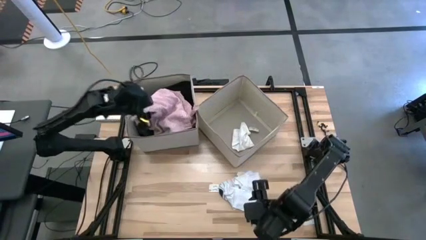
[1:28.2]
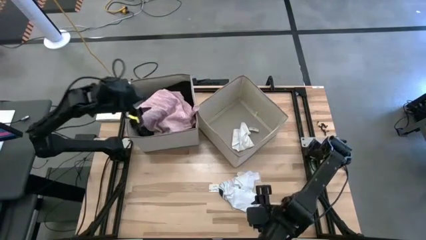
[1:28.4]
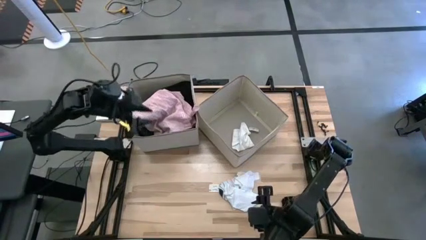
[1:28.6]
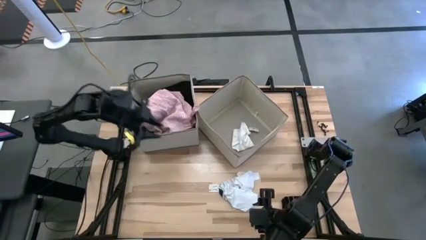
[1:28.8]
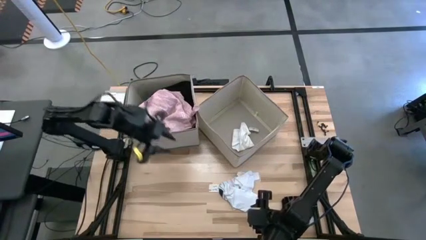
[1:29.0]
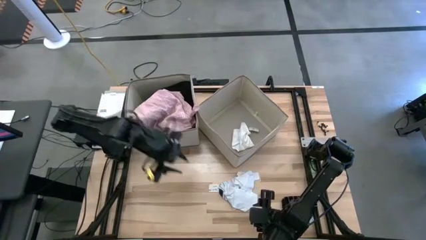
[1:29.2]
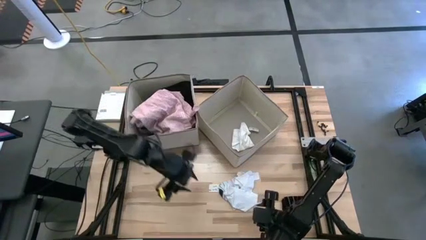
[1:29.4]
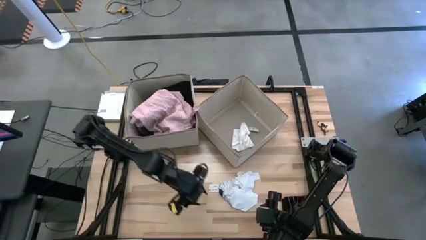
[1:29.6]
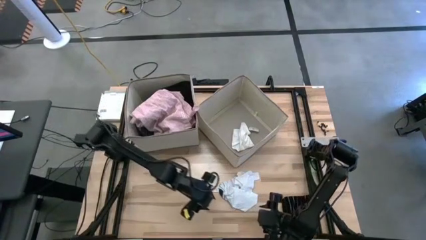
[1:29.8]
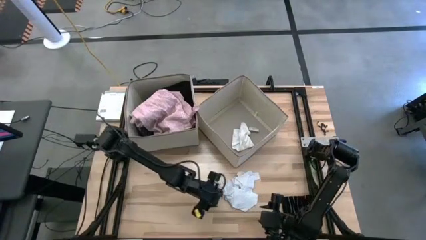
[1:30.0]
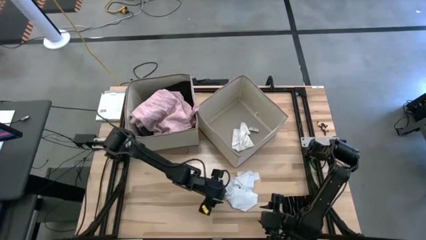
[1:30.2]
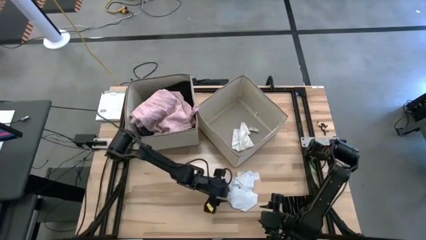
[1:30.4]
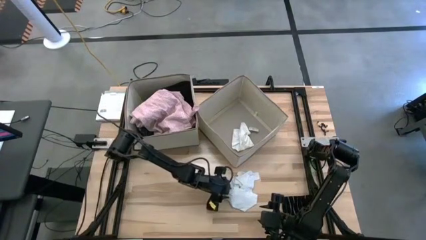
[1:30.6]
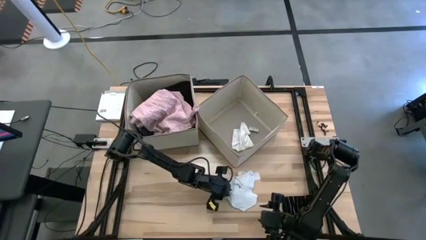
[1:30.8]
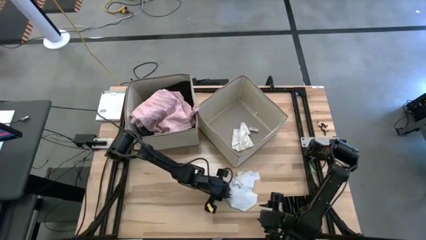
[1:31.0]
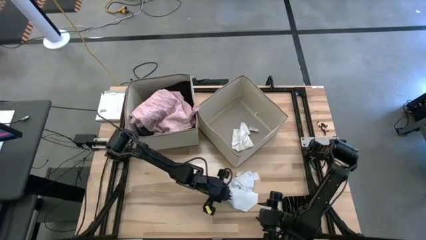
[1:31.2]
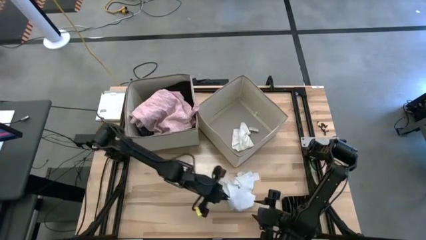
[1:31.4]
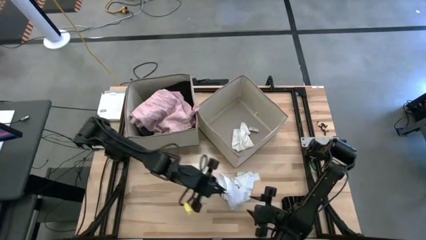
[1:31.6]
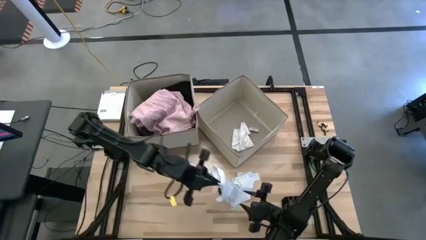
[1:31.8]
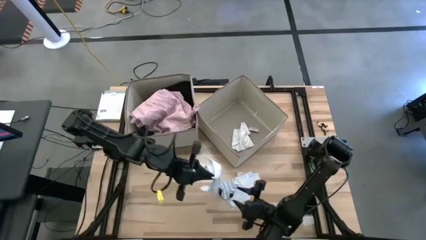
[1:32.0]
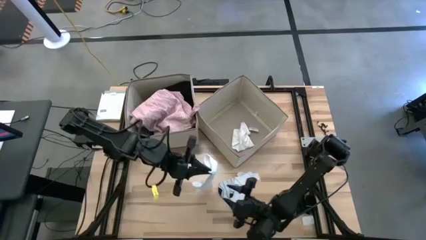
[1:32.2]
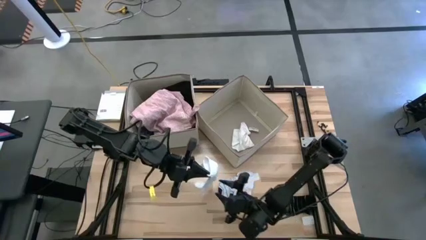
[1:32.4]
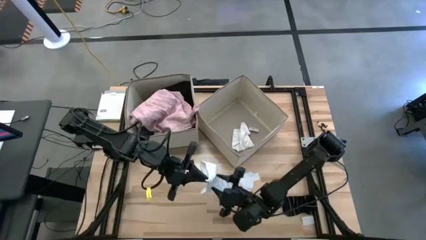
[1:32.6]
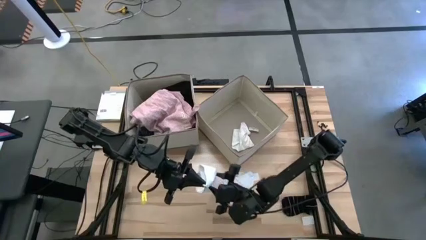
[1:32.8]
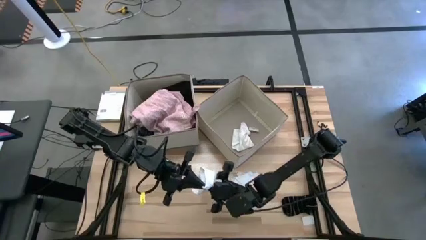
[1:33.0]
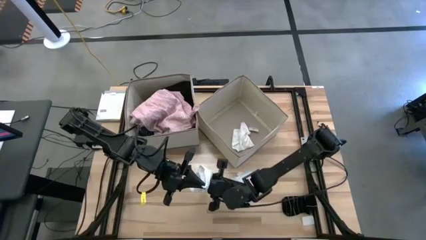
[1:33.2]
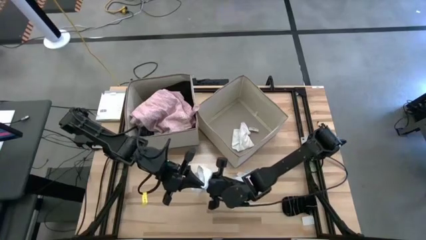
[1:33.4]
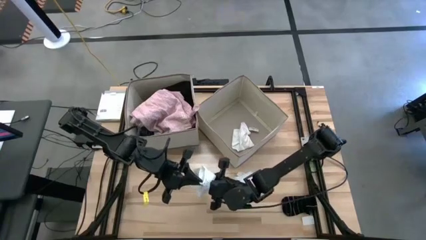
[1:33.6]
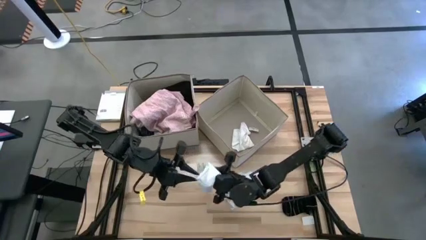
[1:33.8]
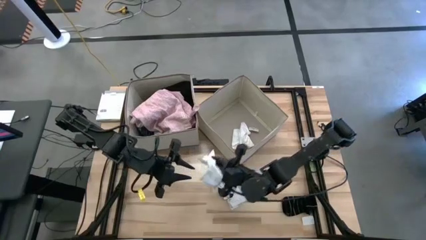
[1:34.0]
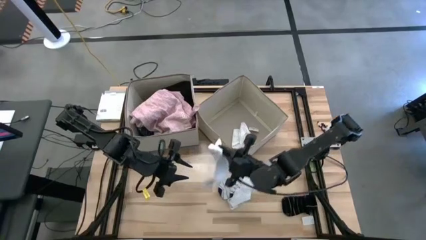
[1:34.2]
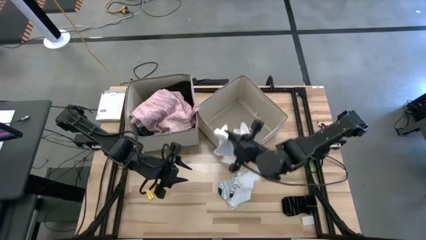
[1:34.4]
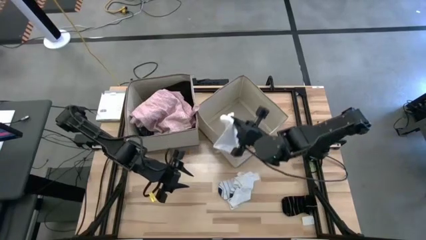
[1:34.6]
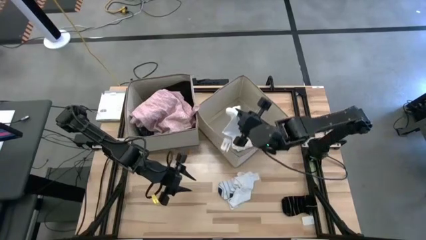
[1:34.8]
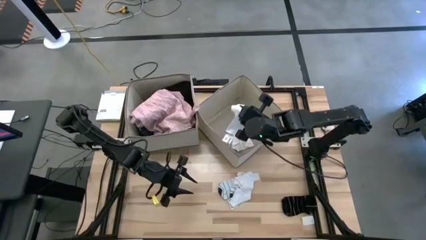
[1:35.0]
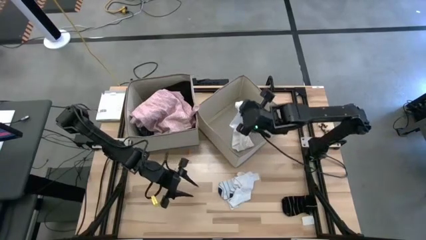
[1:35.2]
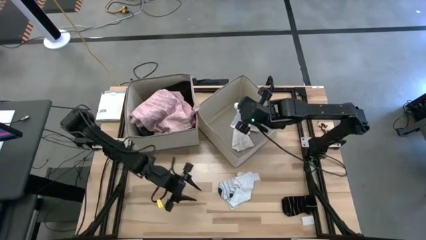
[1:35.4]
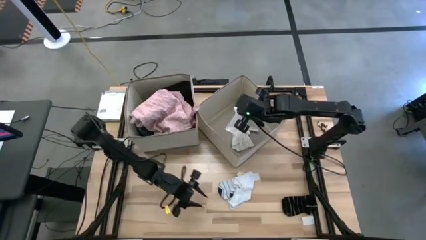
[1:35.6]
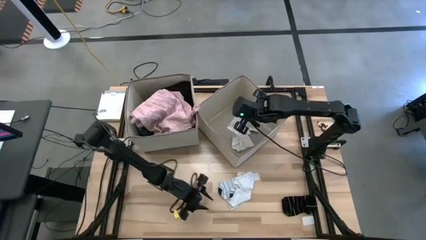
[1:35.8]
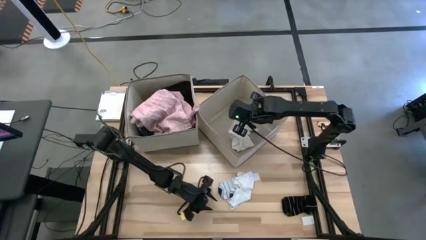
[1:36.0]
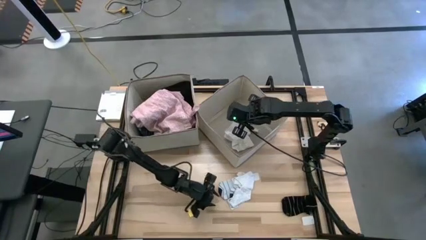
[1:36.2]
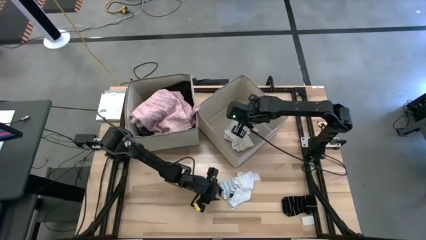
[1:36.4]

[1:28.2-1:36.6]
Task: Sort clothes
Put the white sock into the right laundry organizer

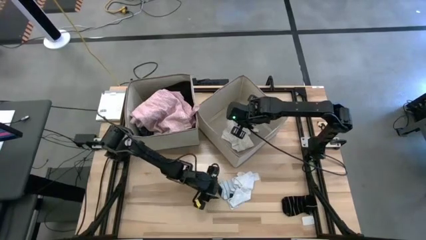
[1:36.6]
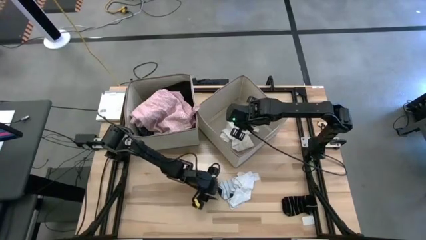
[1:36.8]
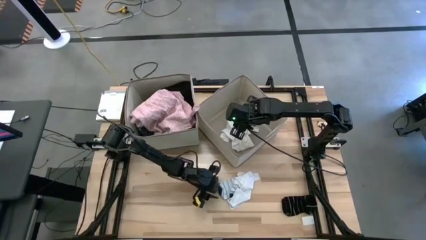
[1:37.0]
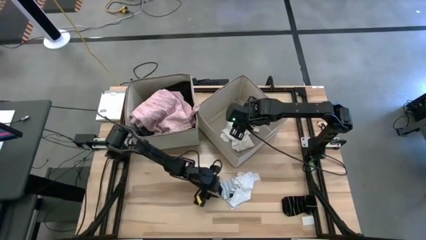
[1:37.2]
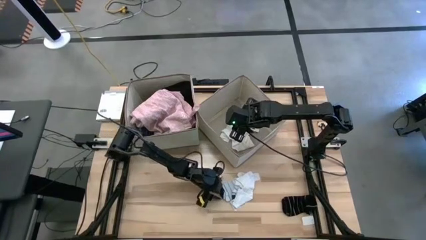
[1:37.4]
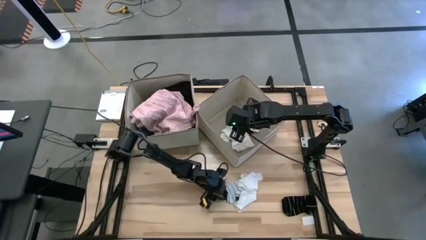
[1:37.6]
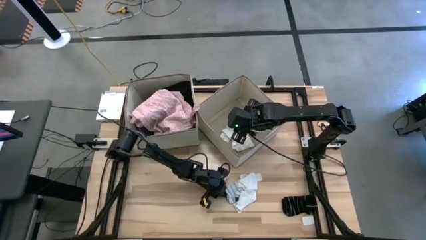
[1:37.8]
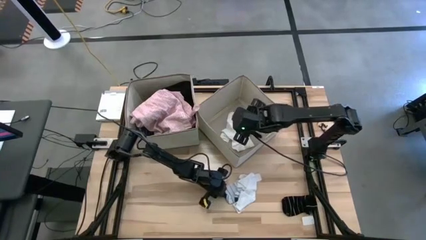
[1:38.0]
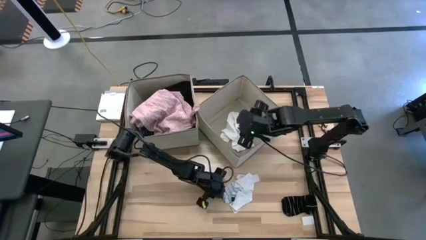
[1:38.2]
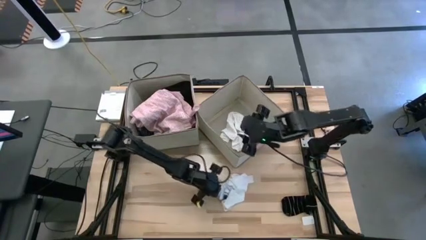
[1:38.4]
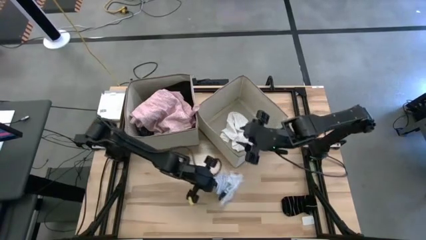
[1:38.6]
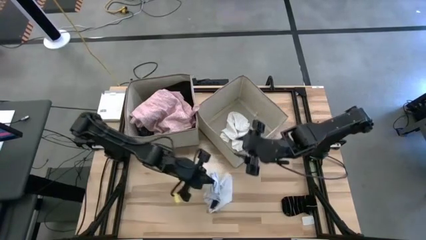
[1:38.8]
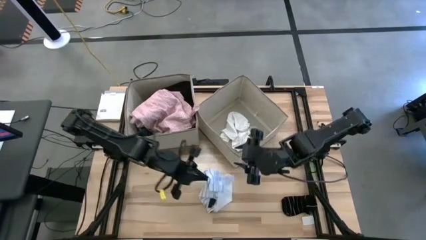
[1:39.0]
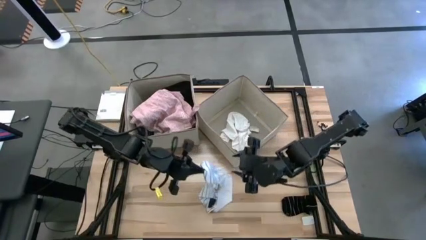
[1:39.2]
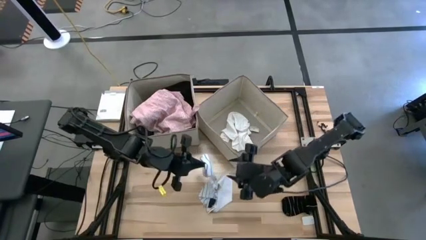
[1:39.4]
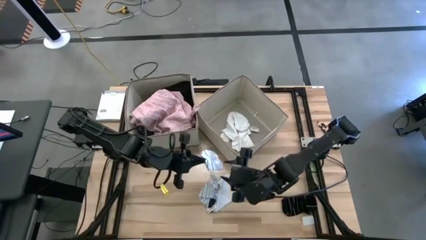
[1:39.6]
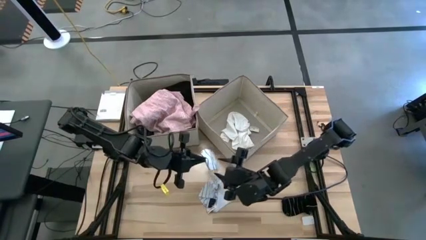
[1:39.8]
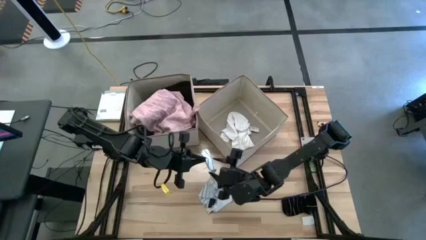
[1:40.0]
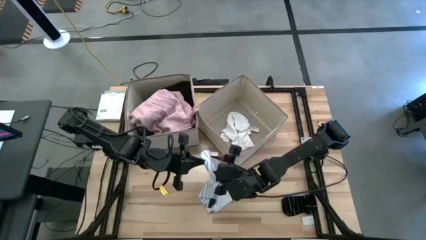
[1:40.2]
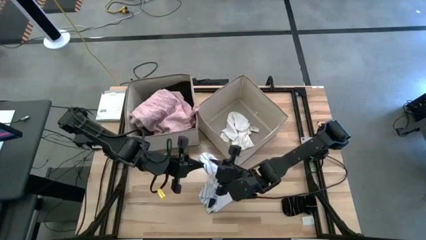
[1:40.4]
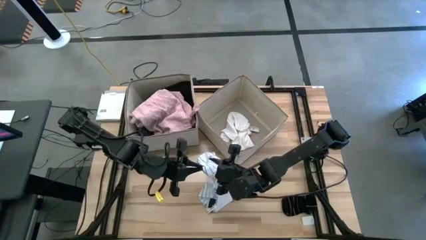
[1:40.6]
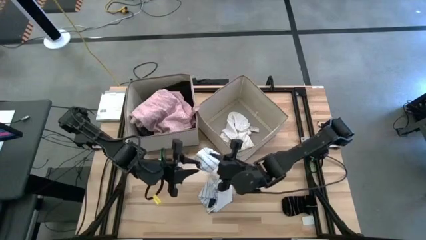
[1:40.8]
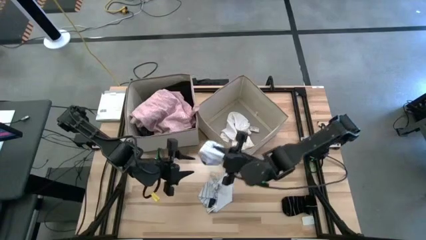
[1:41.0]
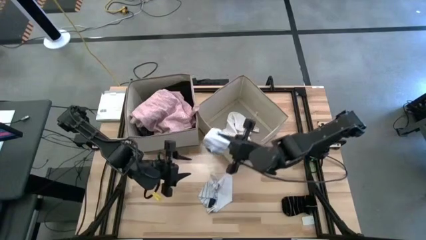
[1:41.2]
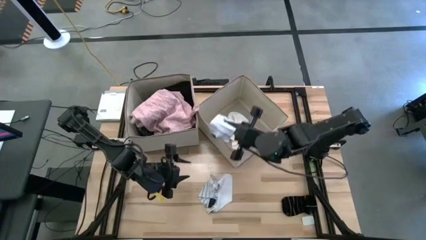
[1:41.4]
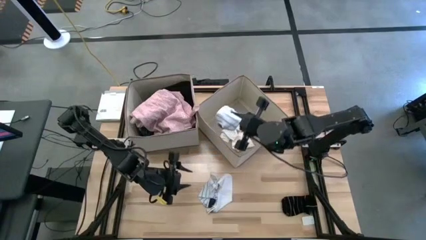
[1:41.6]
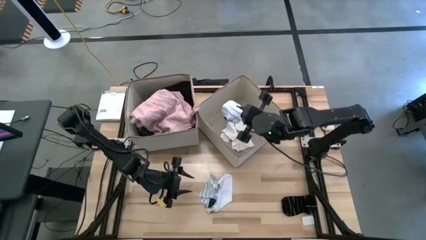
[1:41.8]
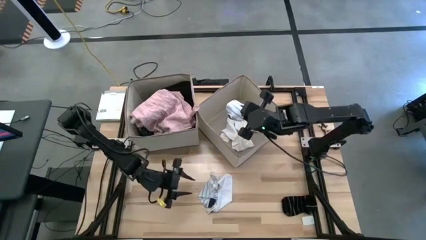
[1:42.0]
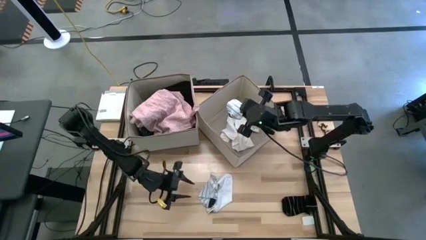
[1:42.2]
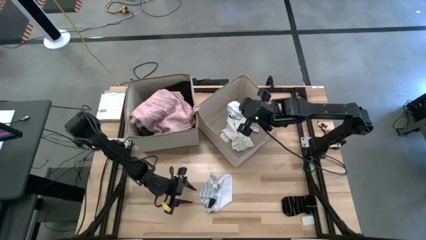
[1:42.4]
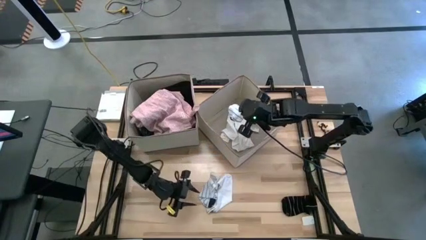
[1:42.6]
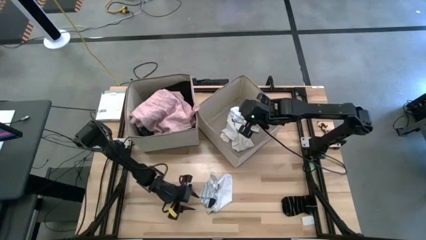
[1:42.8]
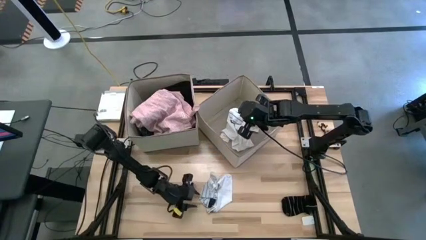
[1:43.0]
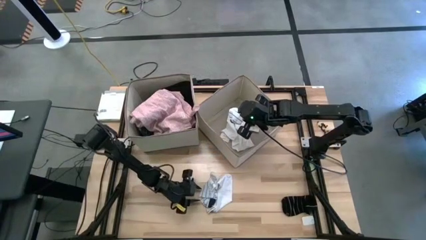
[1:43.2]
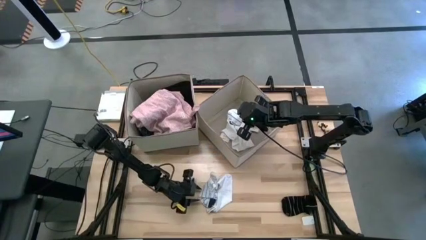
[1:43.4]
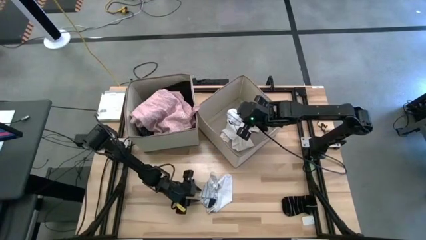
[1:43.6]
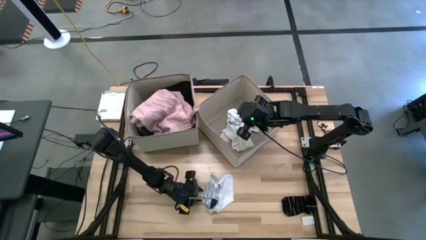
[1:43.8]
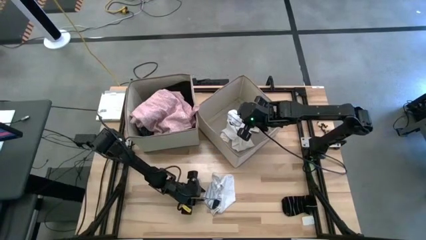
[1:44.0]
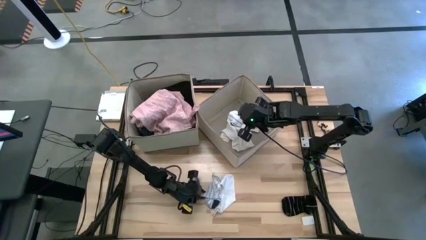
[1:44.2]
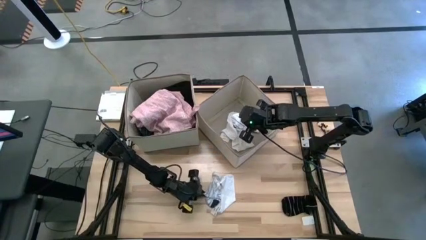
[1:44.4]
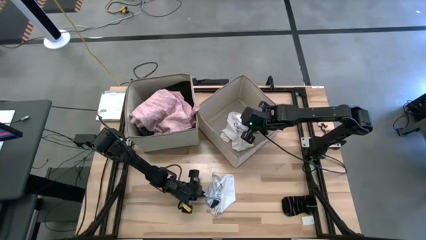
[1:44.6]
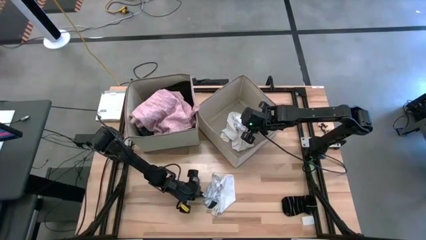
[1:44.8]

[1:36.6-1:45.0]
Put the white striped sock into the right laundry organizer
